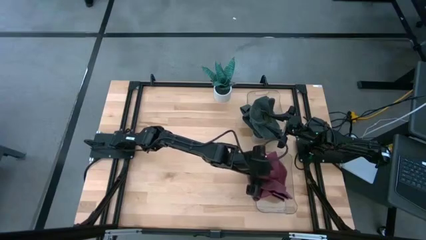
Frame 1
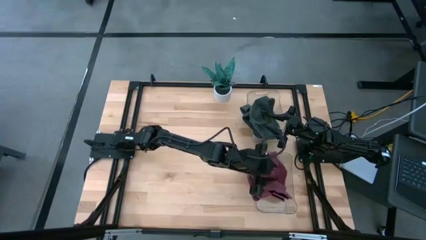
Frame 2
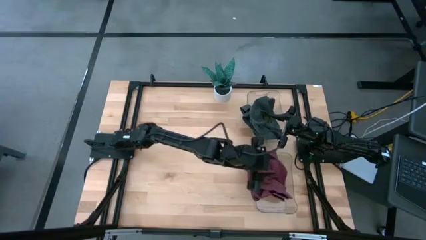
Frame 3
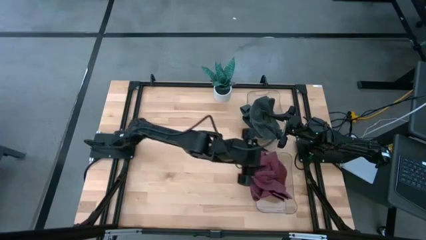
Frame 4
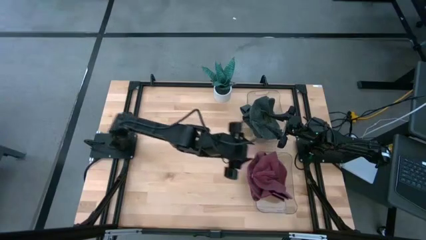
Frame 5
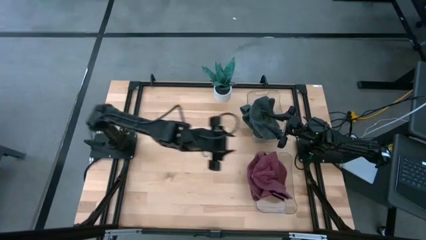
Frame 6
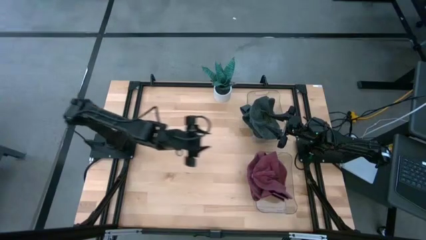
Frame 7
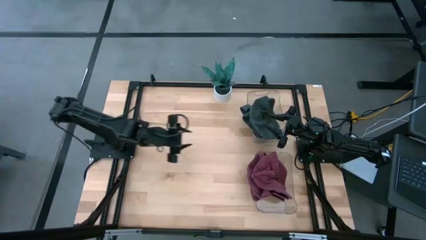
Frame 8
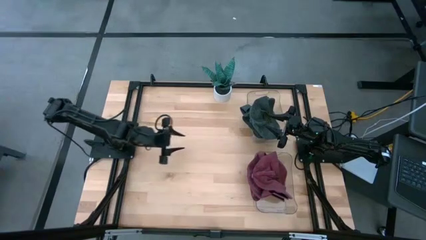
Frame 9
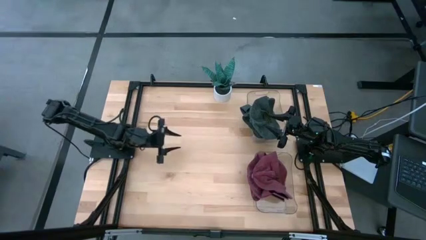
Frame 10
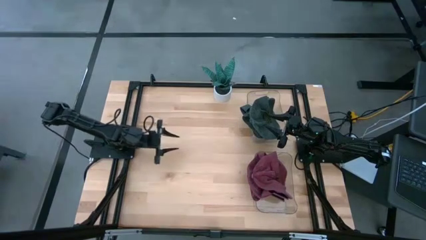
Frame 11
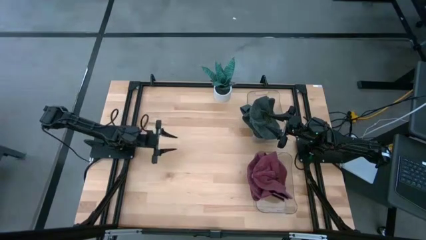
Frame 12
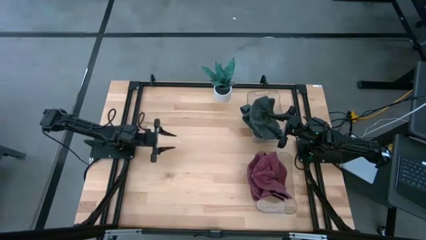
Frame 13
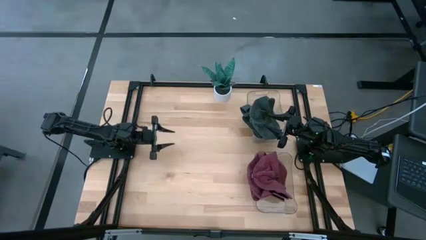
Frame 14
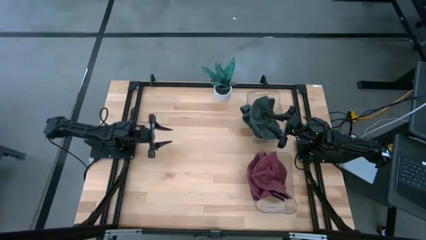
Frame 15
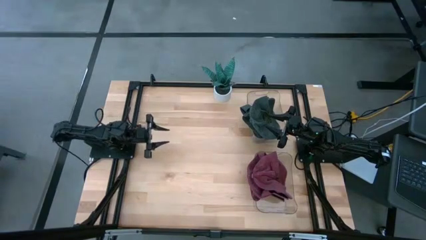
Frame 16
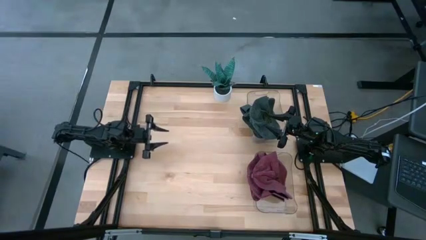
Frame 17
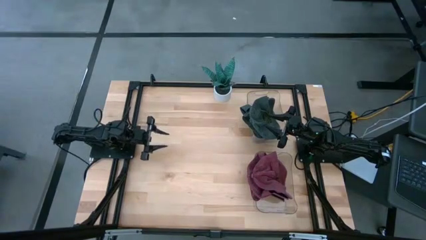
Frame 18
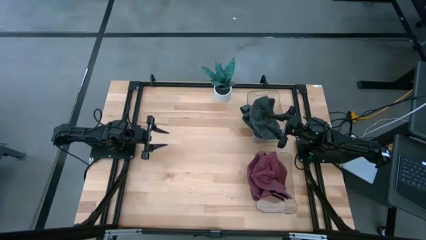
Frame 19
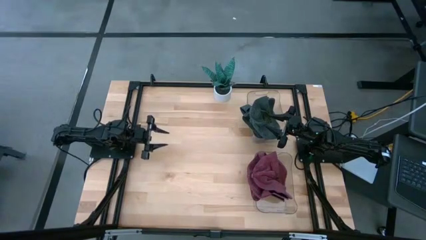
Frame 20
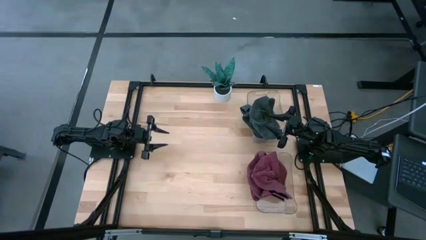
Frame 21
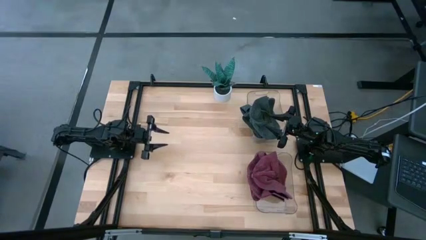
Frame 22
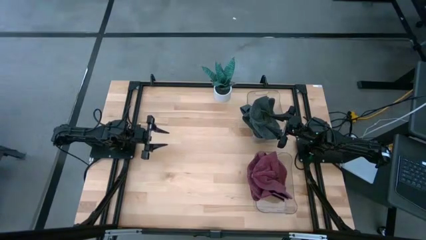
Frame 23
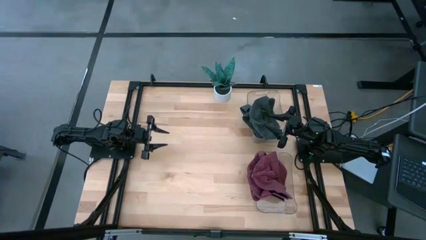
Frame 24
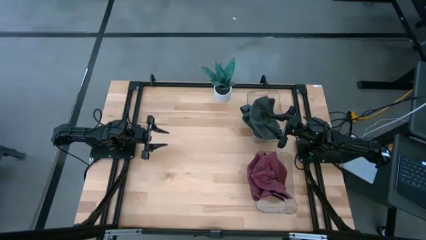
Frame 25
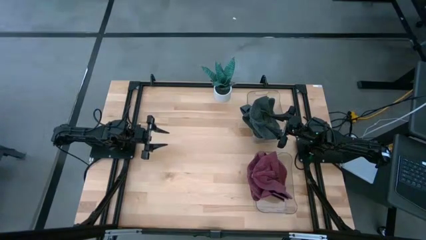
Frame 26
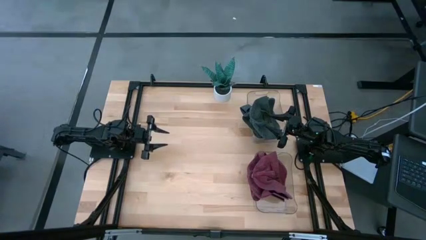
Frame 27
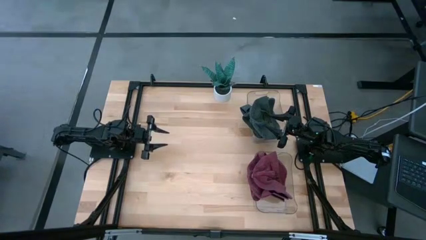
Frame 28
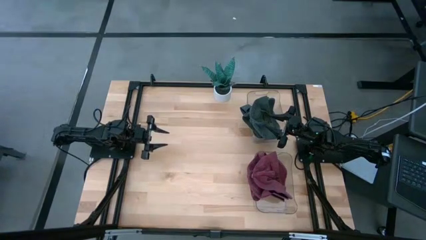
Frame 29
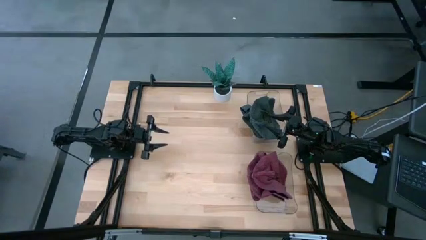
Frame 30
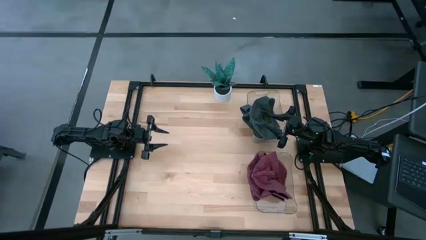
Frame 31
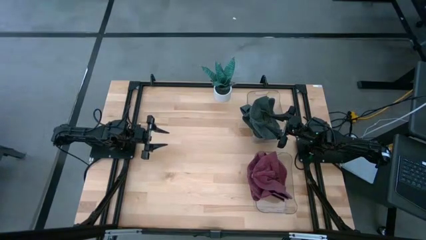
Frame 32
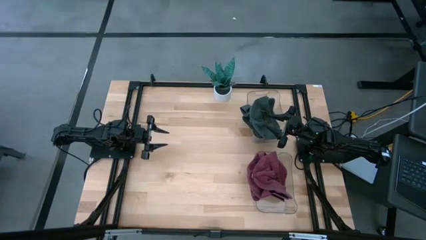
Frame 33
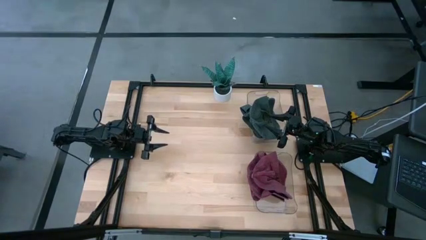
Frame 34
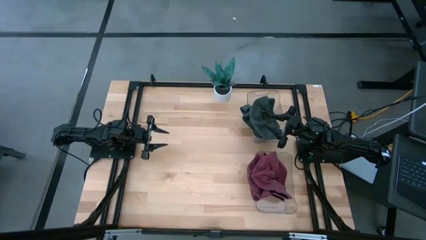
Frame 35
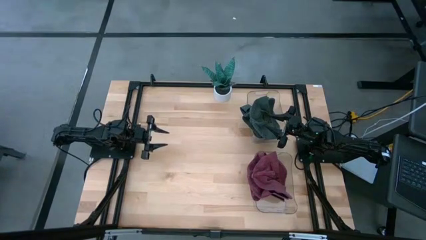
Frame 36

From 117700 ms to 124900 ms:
Task: Pick & Place hat
Return To Home Position

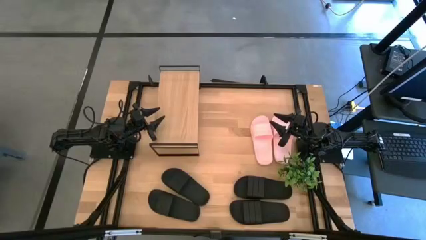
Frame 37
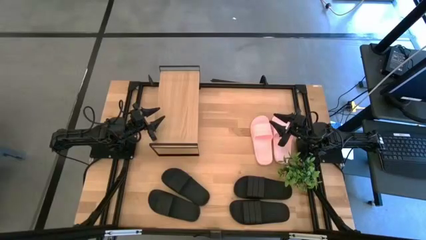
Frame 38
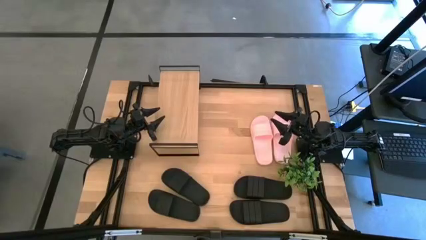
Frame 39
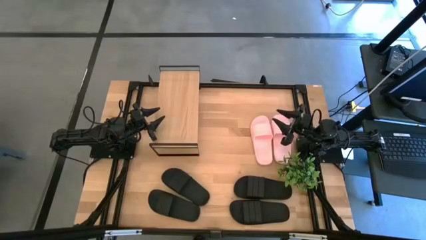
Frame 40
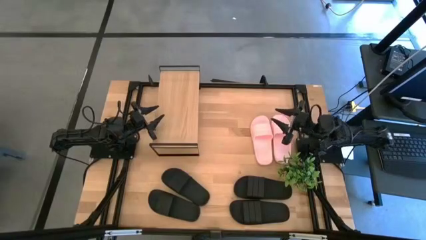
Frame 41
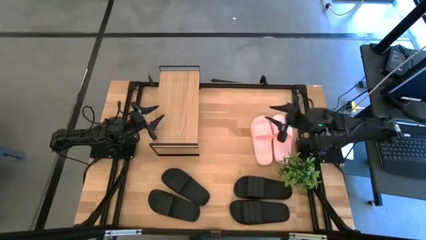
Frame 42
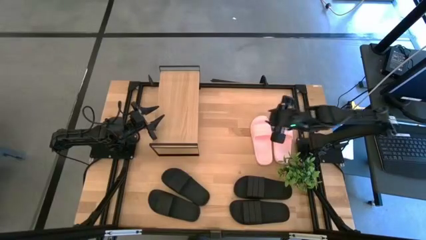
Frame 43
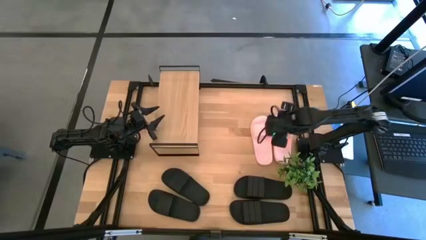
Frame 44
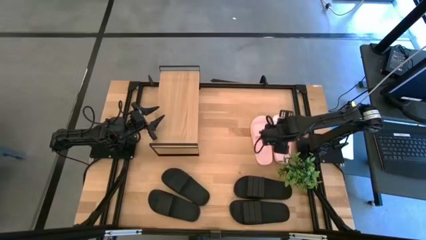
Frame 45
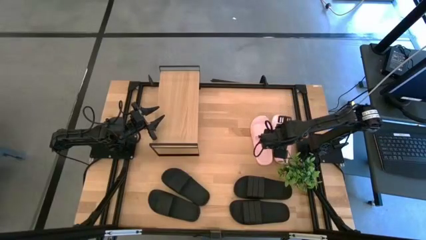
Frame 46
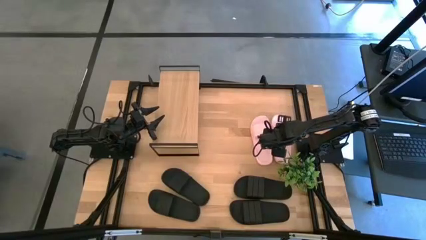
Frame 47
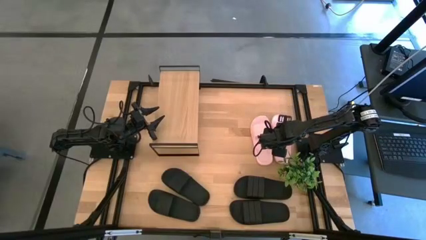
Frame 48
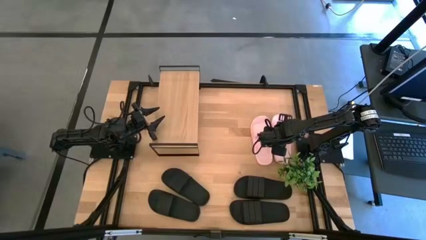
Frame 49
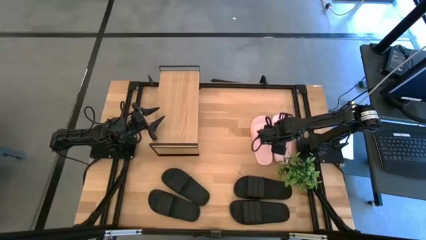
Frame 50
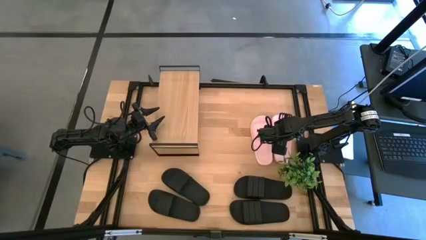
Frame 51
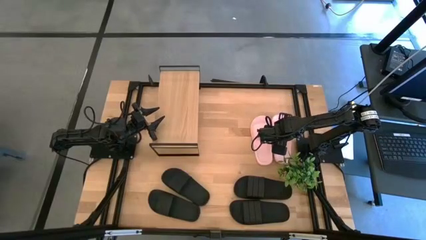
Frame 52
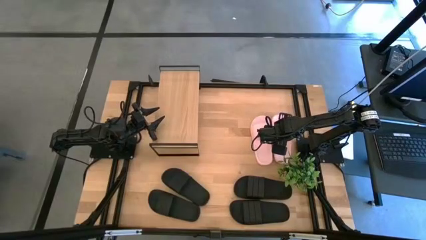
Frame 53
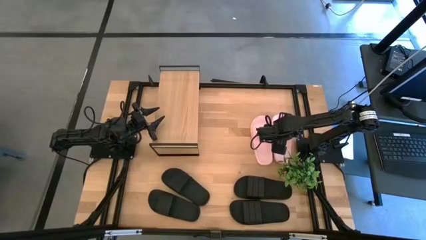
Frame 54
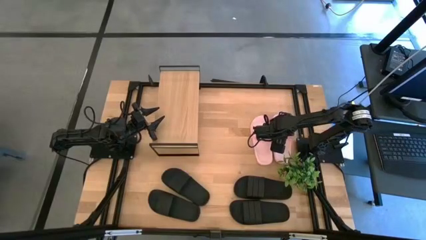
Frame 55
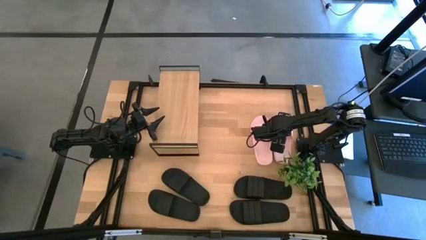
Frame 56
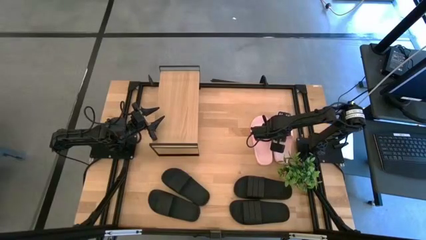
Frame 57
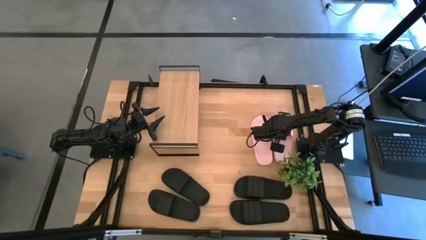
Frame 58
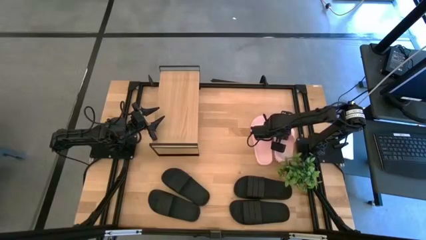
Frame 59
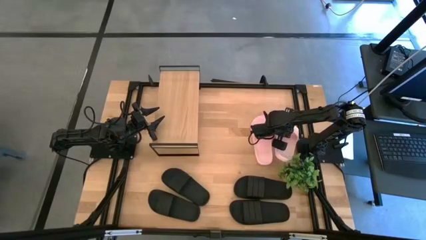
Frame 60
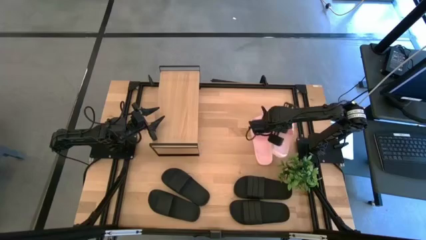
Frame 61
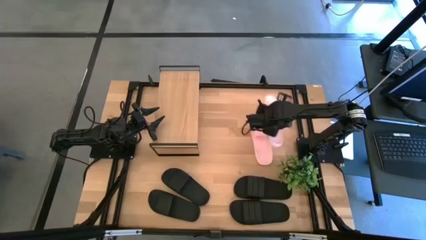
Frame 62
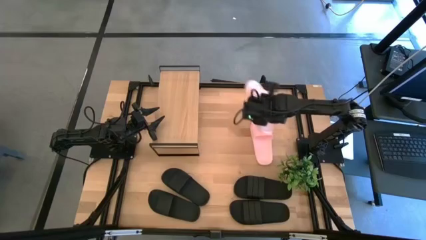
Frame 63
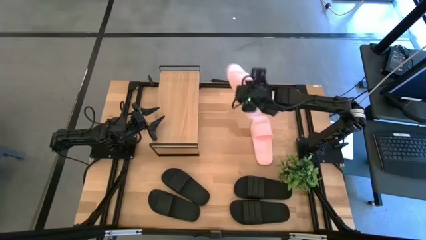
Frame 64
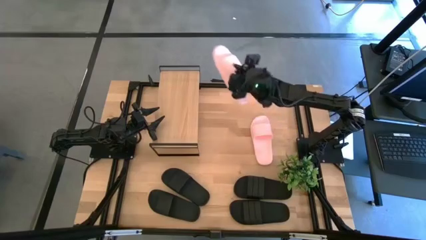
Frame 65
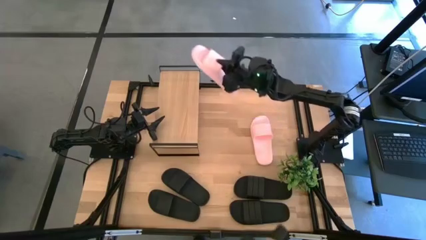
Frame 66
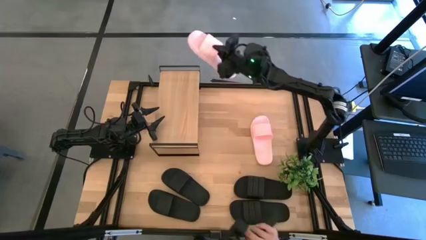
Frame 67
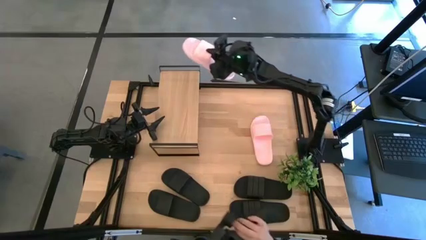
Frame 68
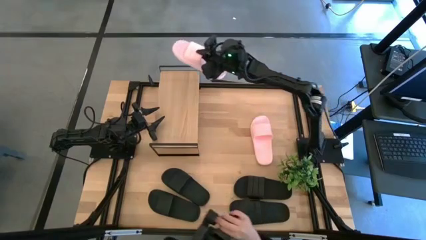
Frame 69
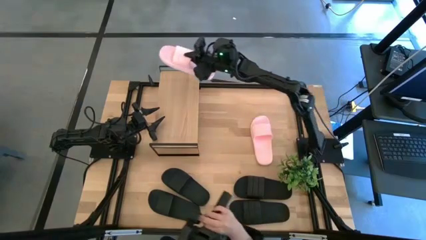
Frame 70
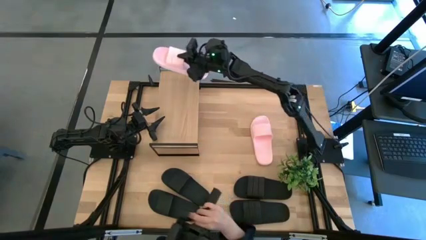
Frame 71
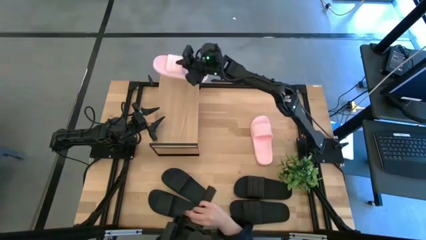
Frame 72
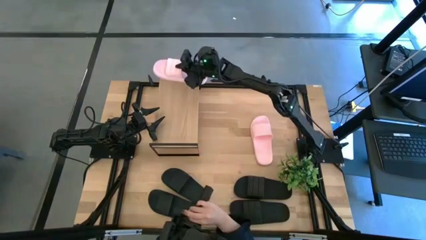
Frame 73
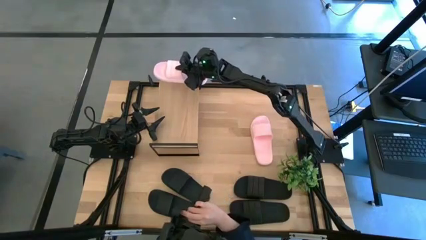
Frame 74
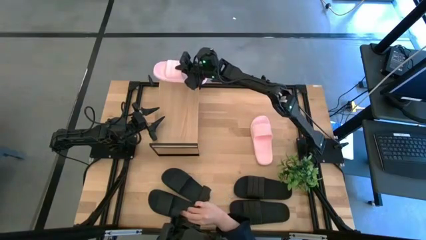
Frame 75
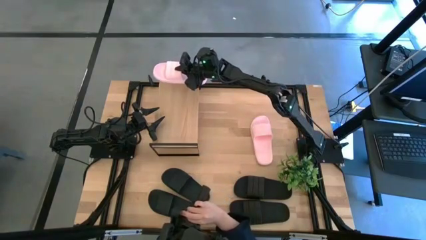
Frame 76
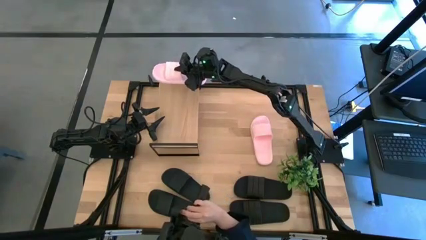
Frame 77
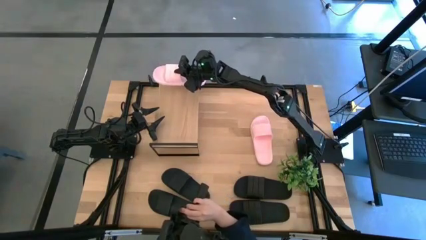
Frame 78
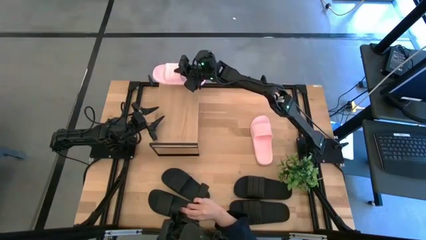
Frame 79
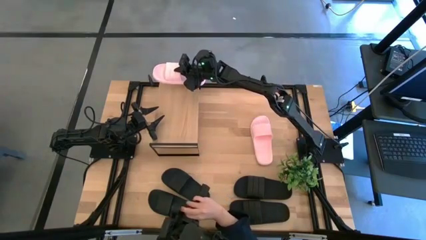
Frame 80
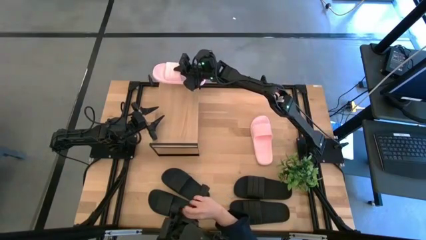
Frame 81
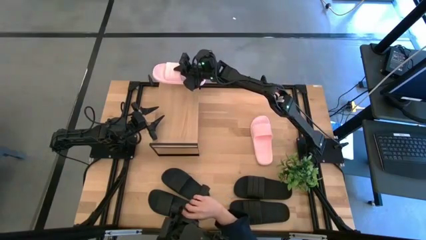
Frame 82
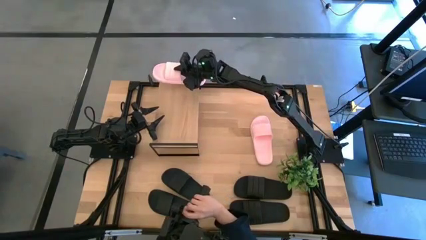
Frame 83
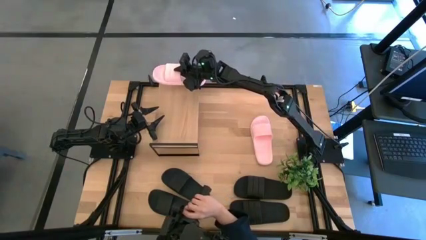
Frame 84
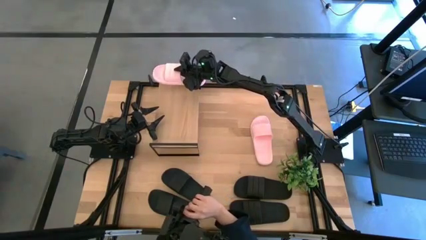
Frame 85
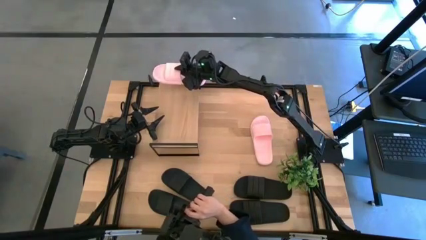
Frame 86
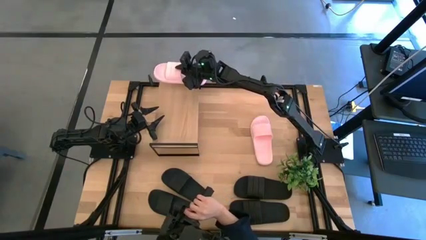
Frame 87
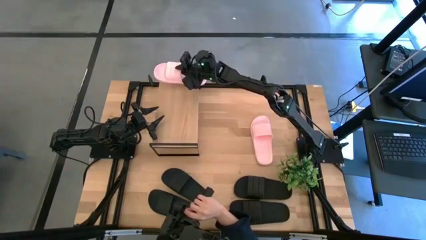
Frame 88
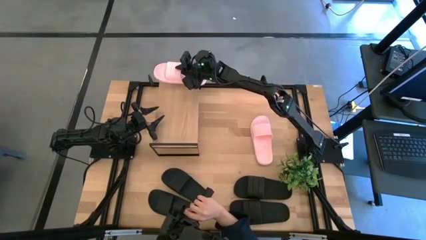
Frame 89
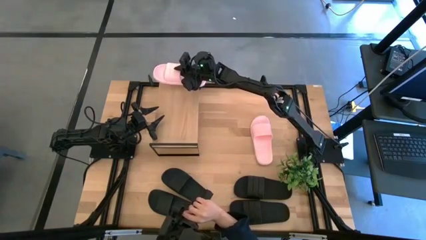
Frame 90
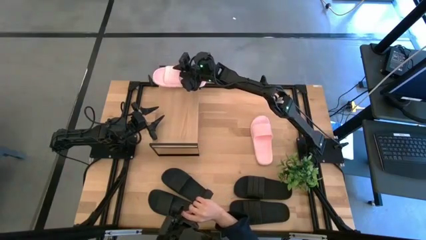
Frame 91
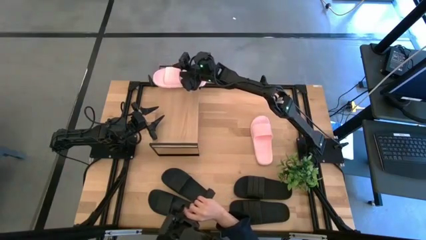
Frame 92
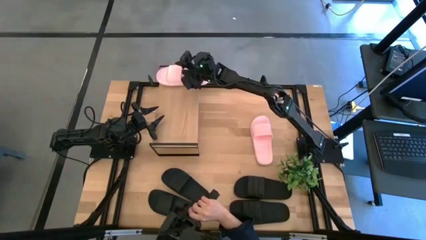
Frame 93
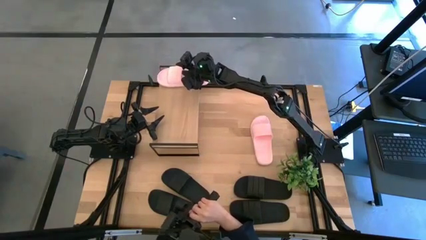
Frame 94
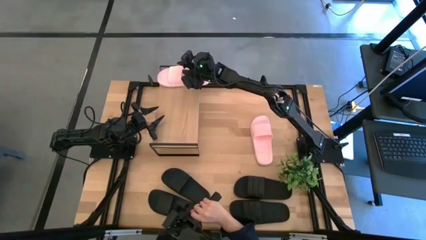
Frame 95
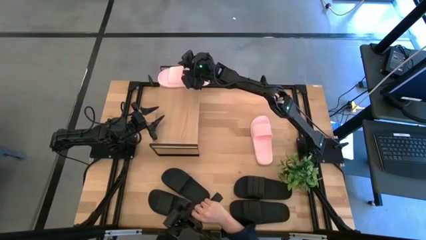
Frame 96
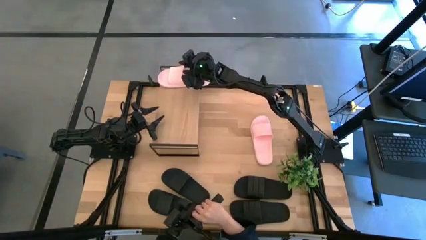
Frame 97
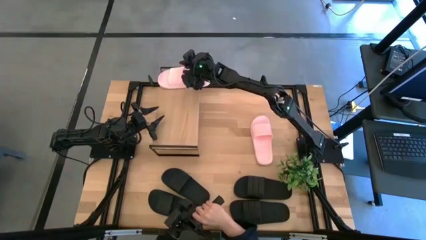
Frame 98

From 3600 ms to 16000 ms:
Task: Pick and place slides into the shelf
Put the right pink slide on the shelf
